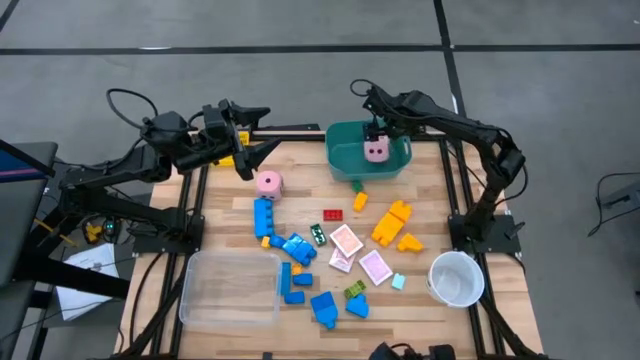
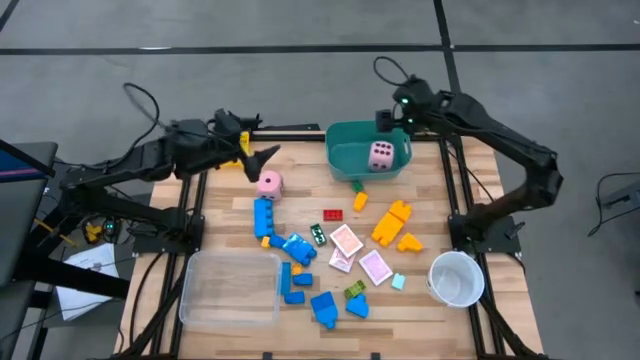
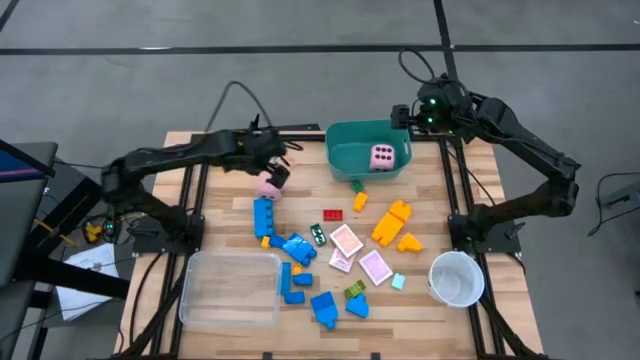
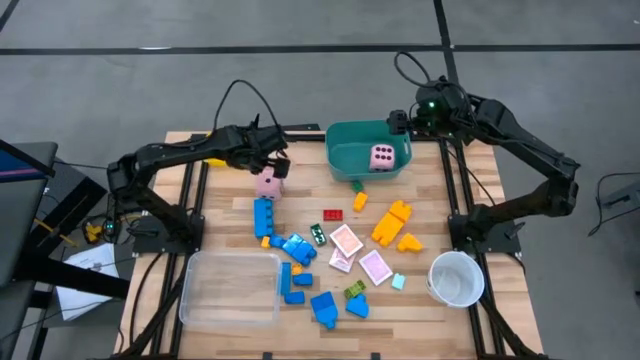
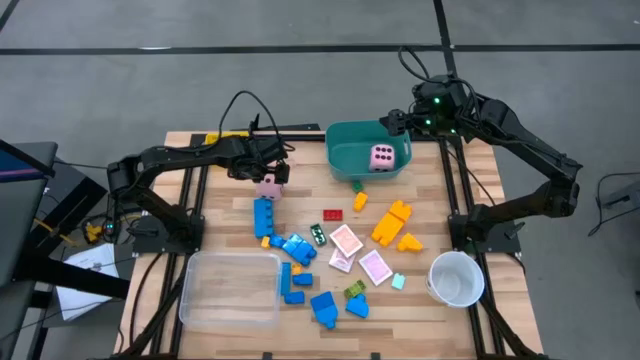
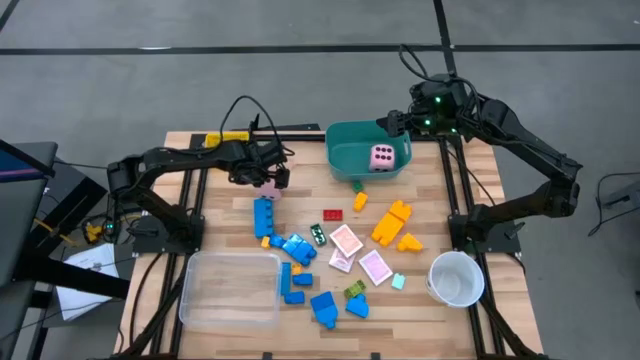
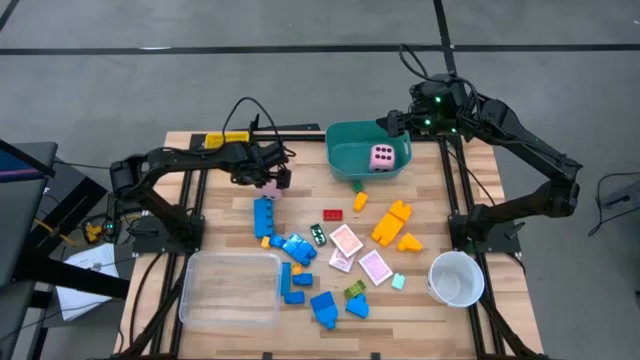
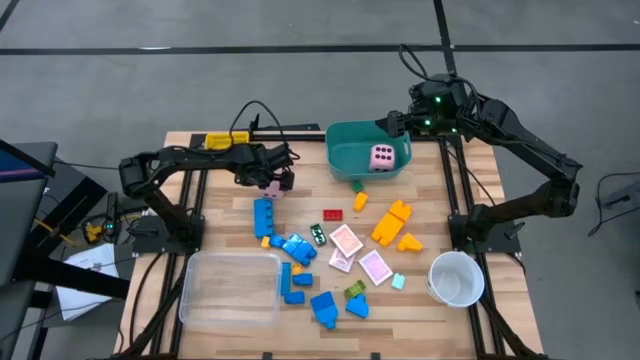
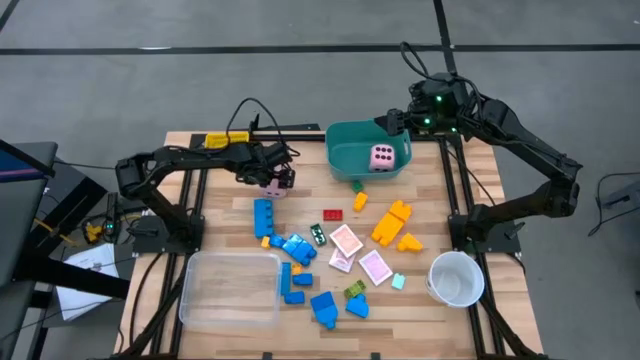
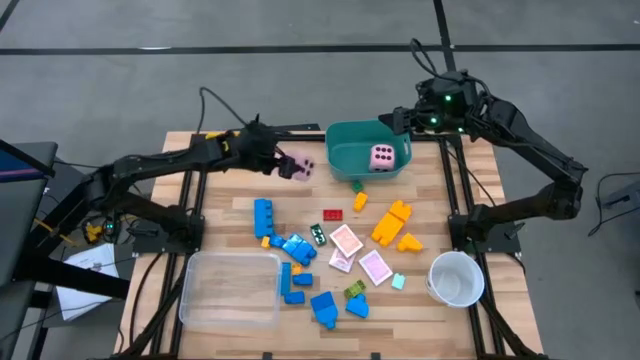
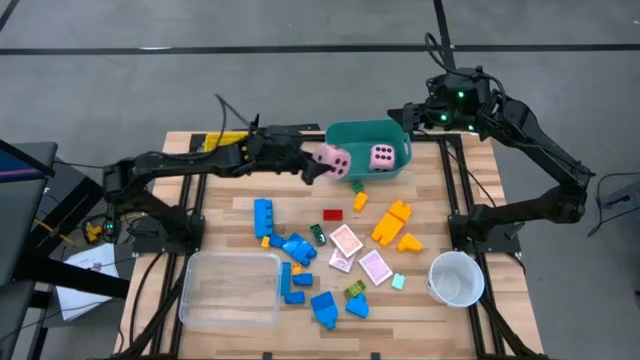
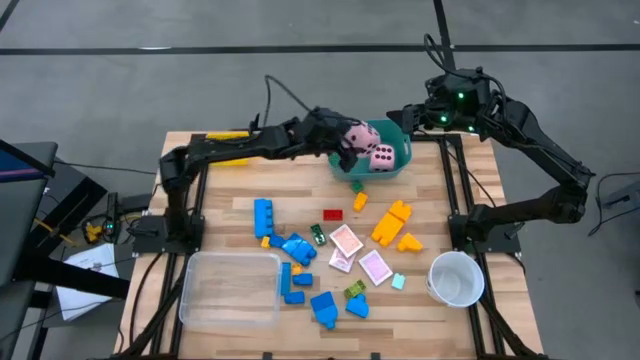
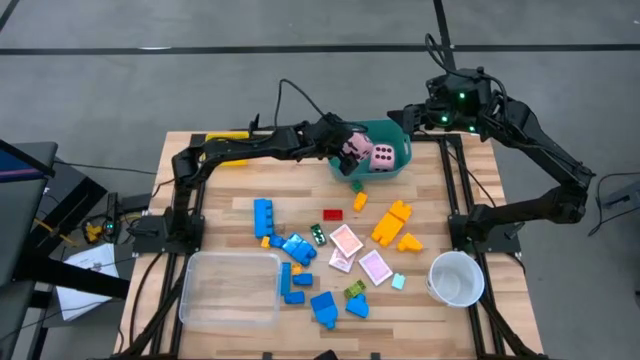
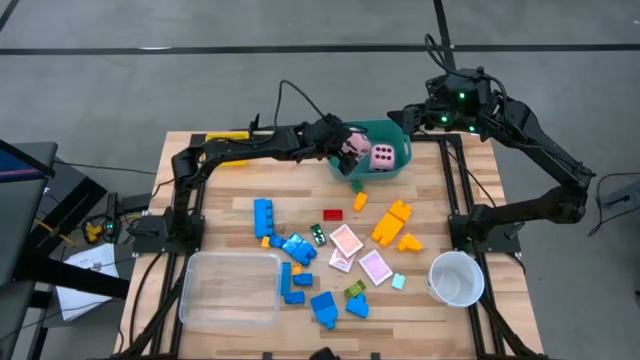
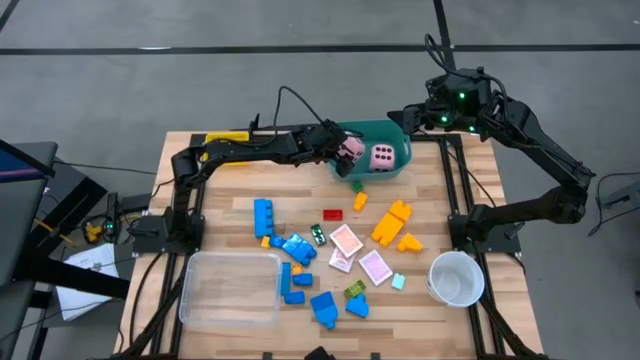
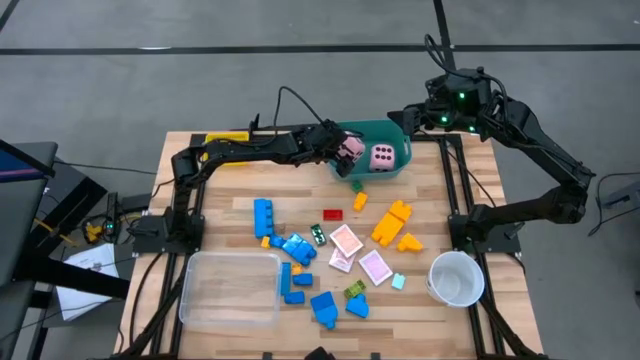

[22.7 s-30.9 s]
Task: Pick & Place Toys
Put the pink die into the green bin

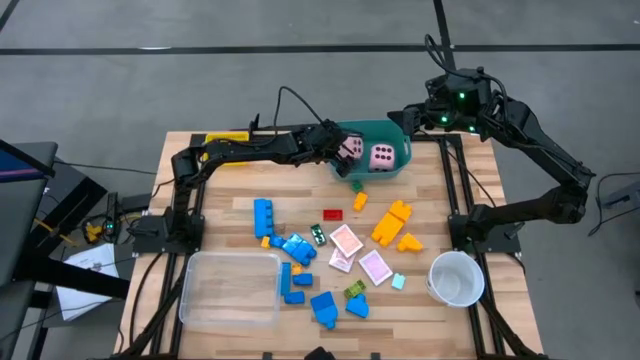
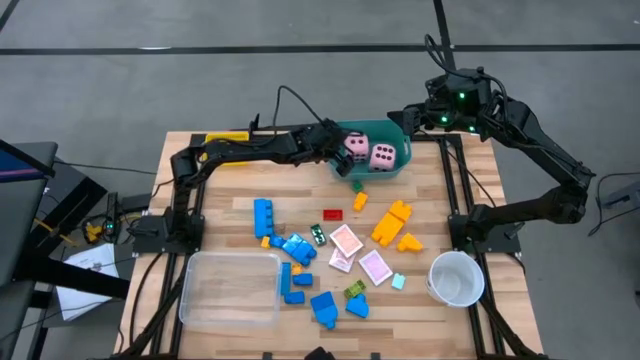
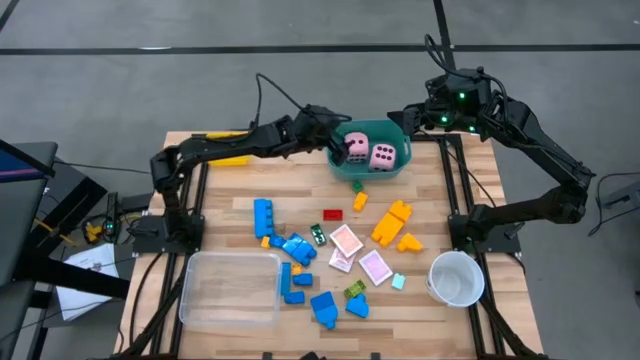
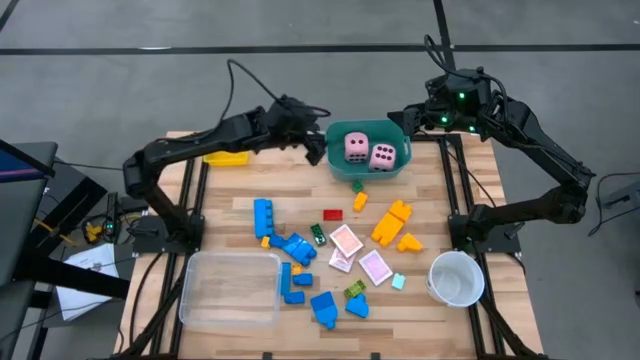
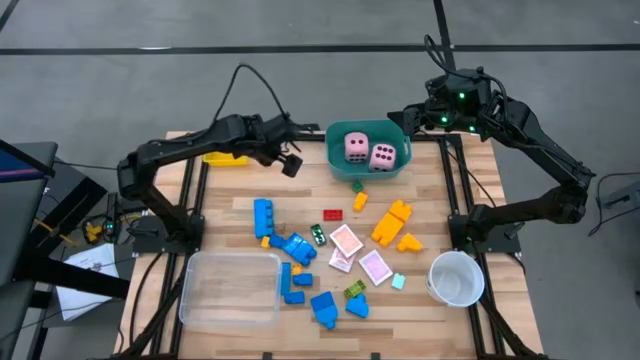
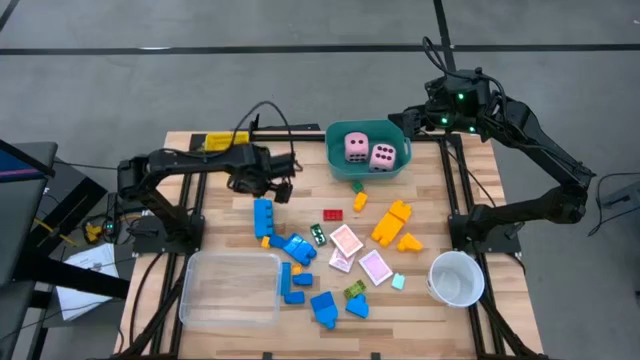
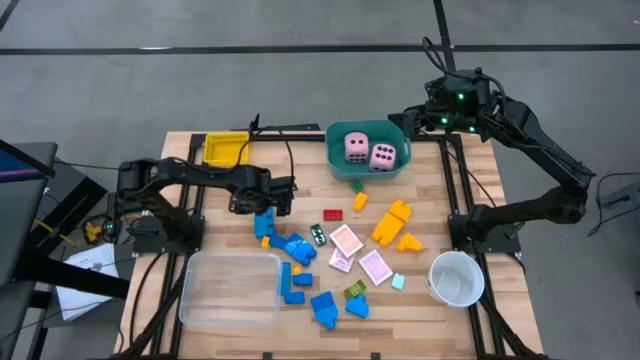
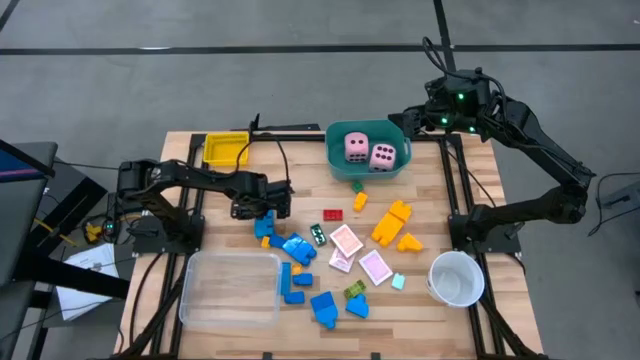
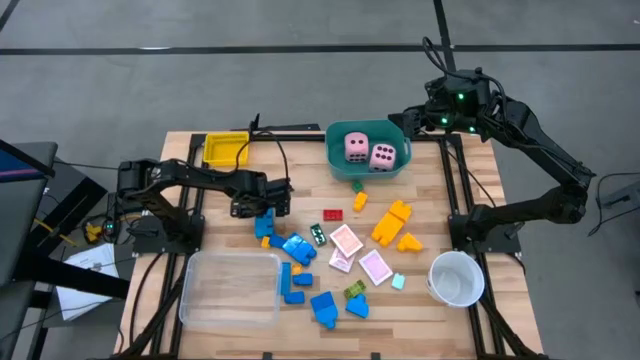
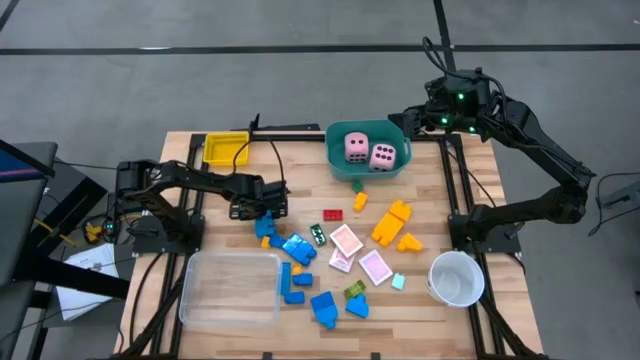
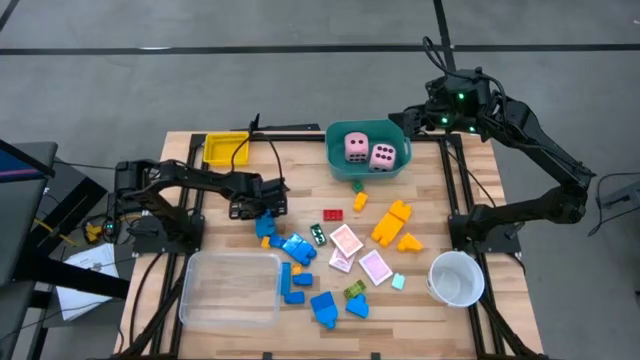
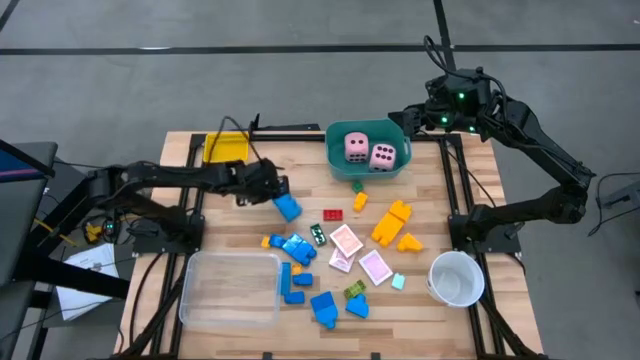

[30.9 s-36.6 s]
Put the blue game piece into the transparent bin

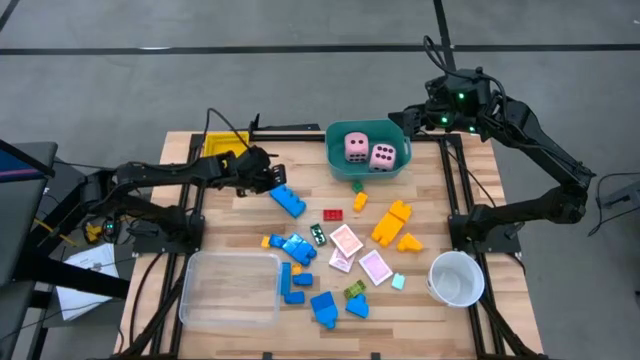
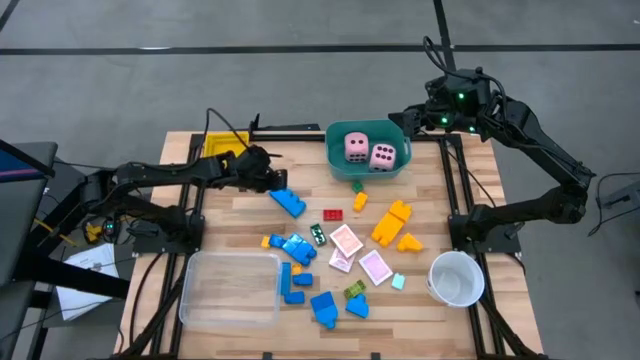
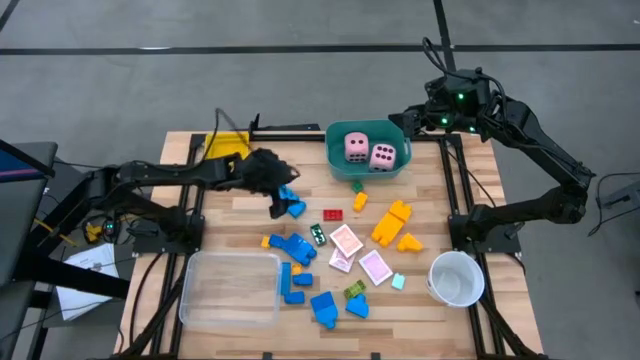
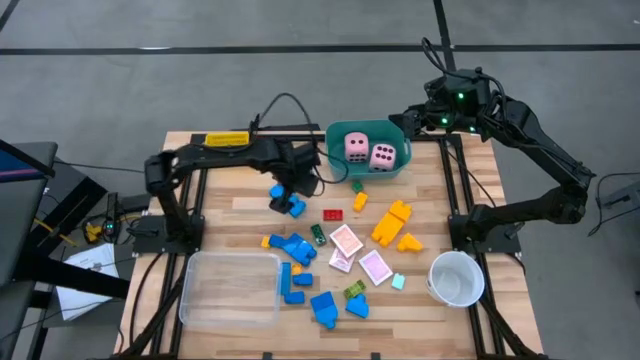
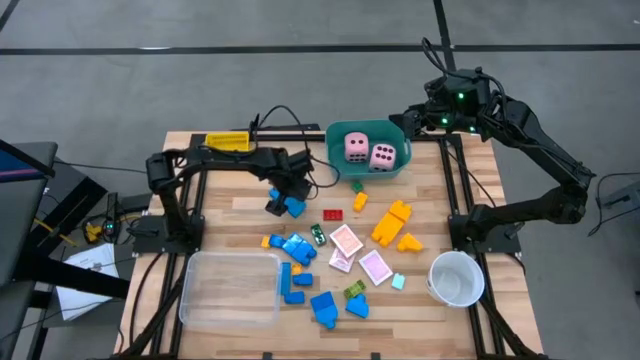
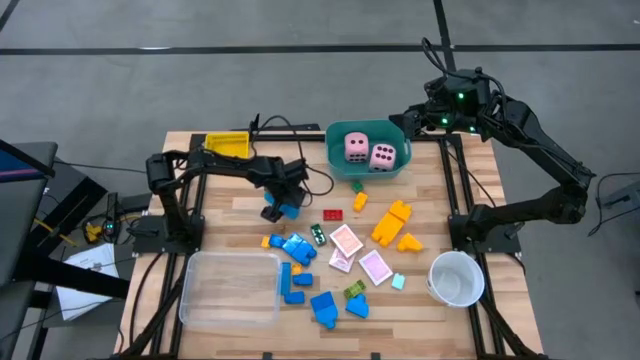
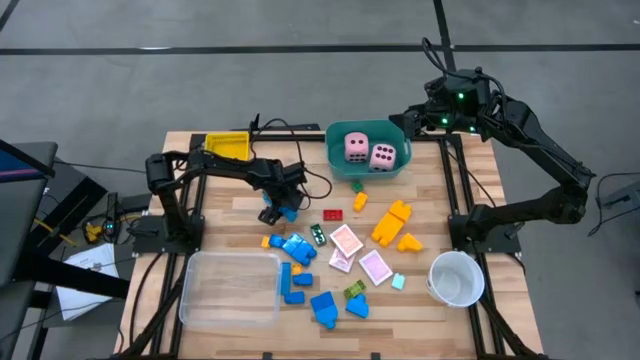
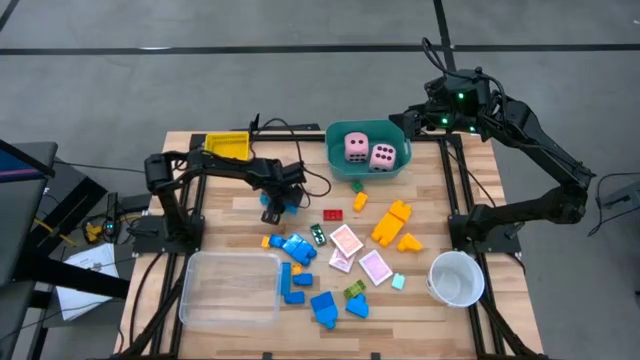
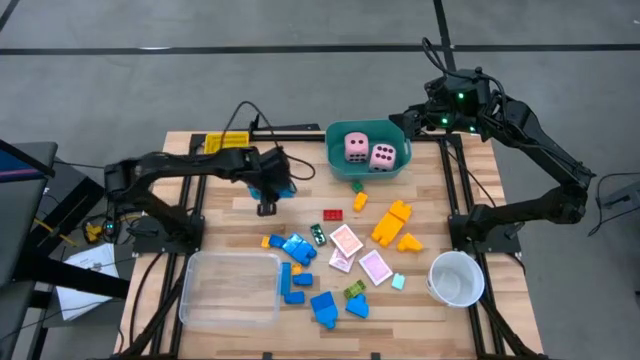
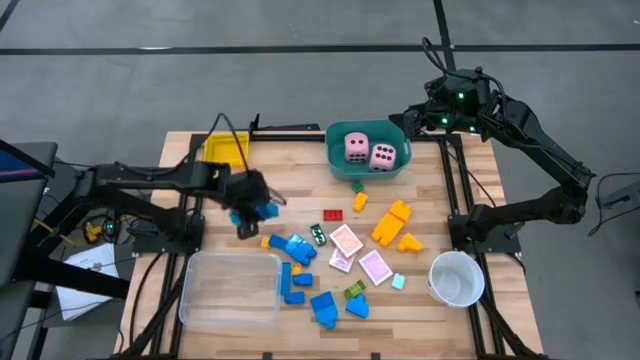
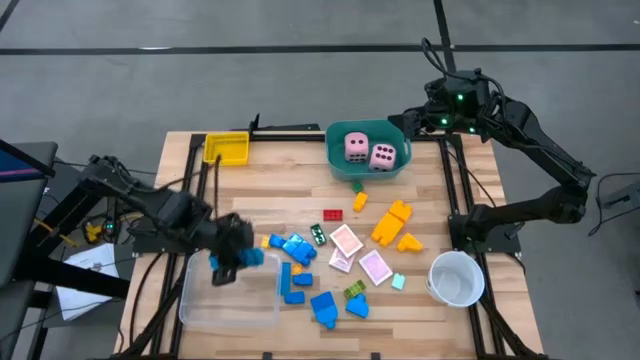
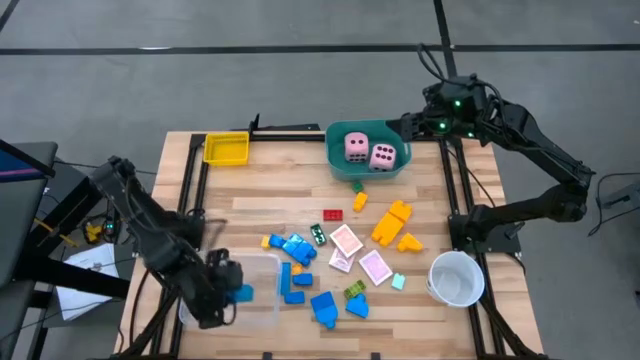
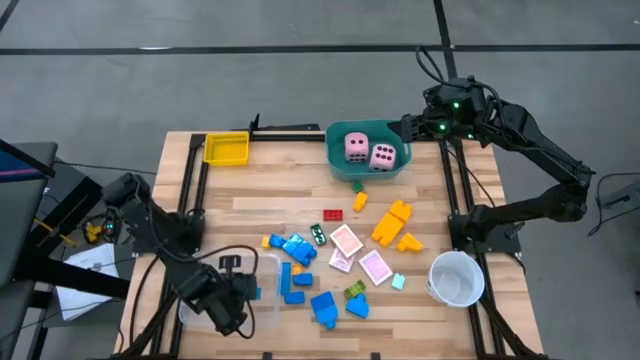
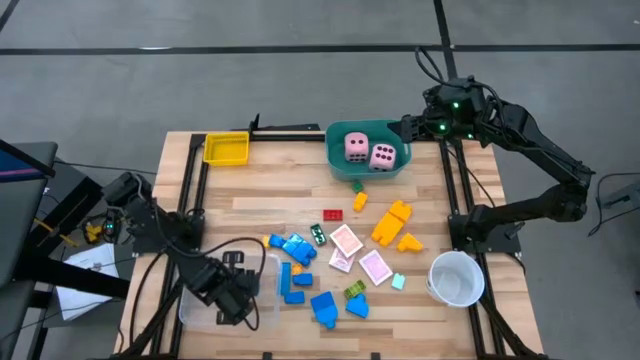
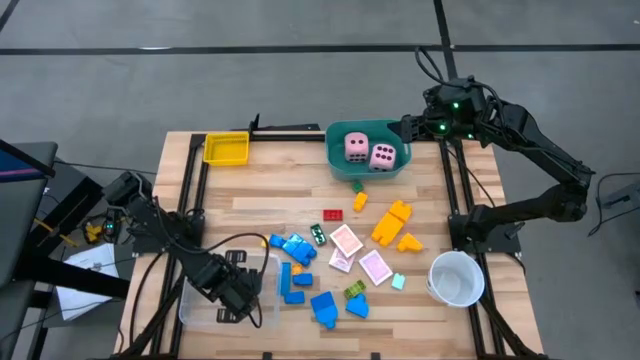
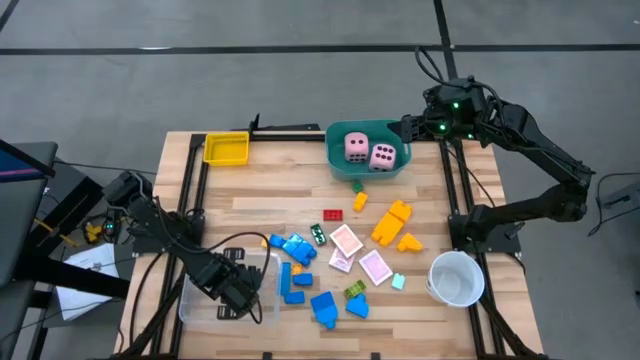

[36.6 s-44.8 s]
Put the blue game piece into the transparent bin
